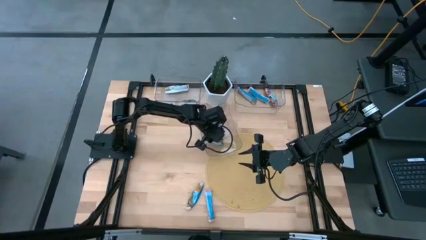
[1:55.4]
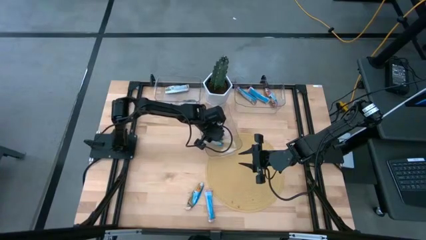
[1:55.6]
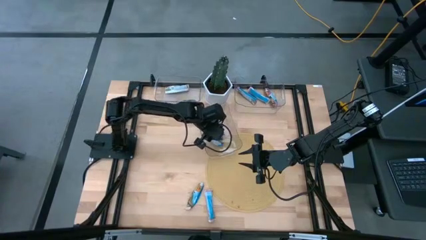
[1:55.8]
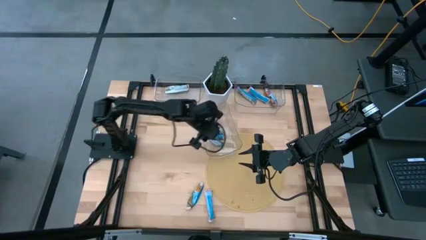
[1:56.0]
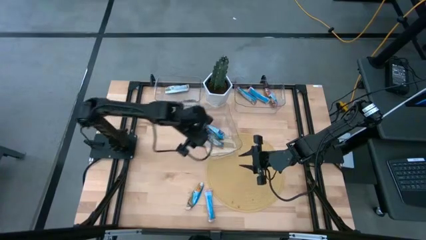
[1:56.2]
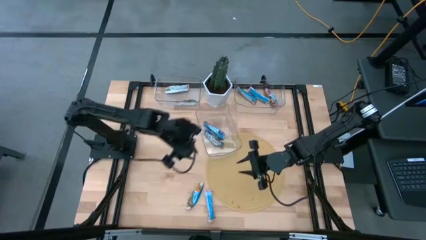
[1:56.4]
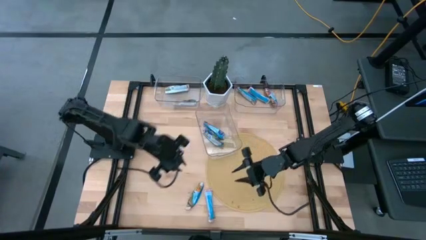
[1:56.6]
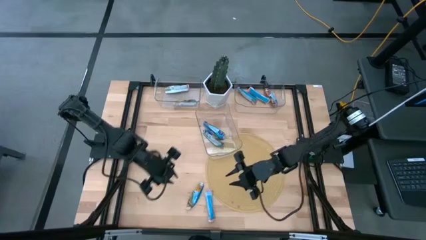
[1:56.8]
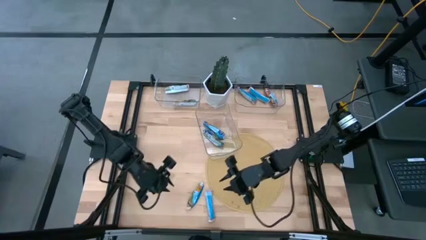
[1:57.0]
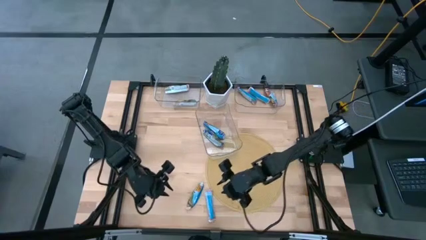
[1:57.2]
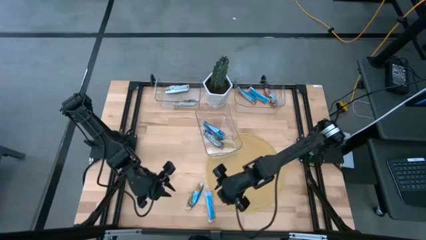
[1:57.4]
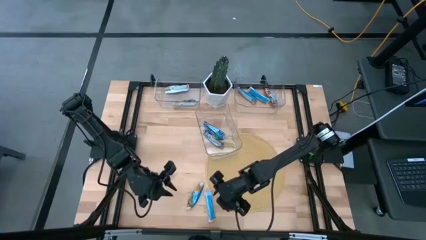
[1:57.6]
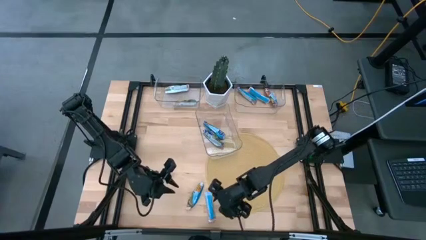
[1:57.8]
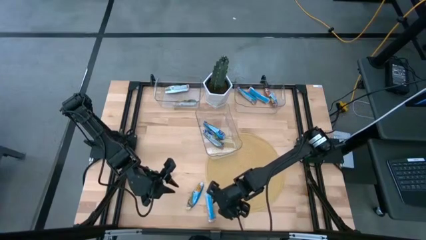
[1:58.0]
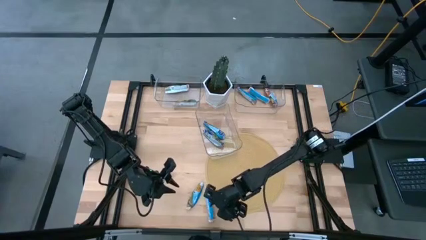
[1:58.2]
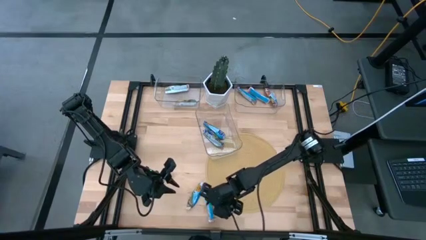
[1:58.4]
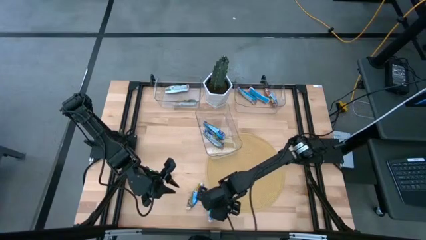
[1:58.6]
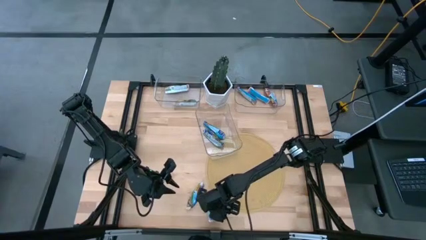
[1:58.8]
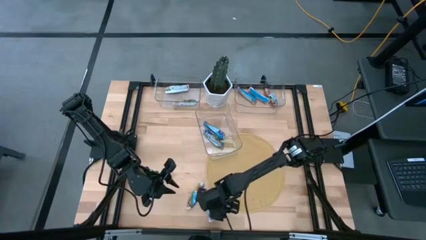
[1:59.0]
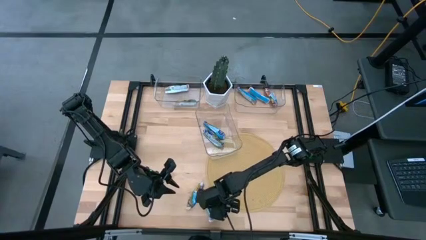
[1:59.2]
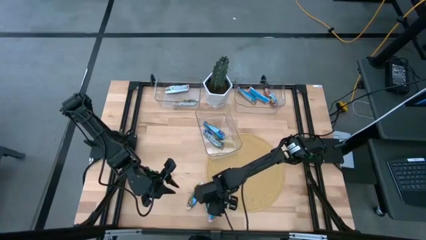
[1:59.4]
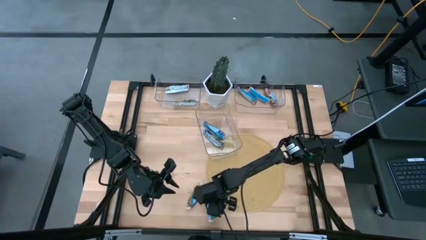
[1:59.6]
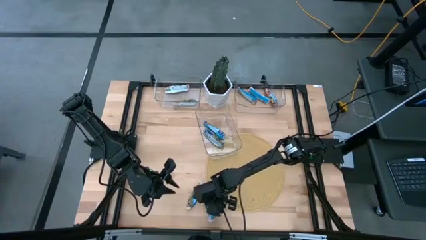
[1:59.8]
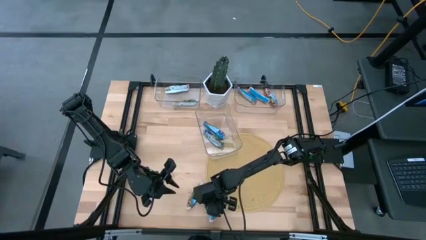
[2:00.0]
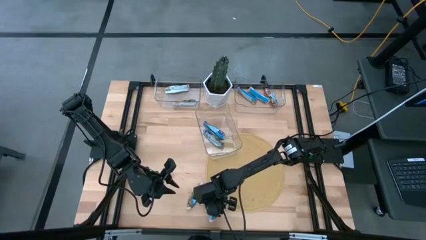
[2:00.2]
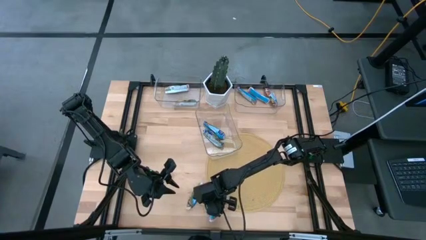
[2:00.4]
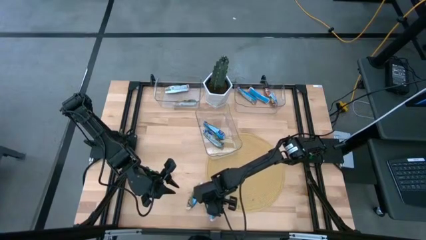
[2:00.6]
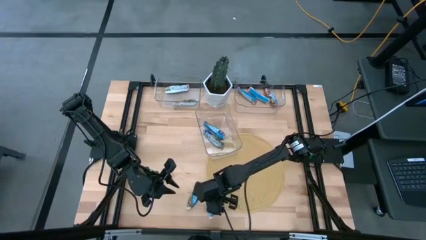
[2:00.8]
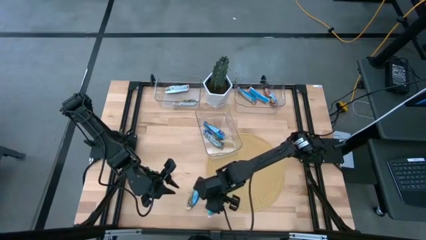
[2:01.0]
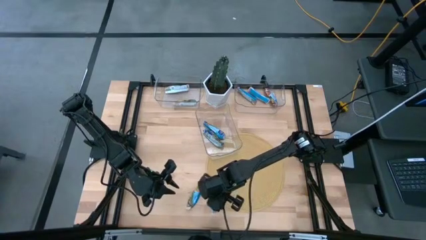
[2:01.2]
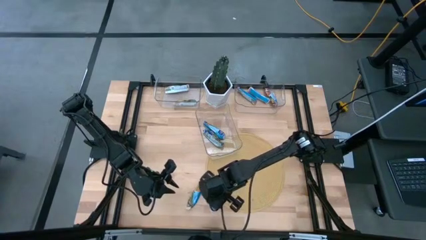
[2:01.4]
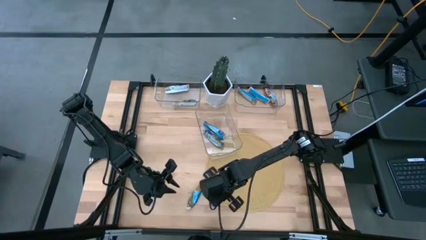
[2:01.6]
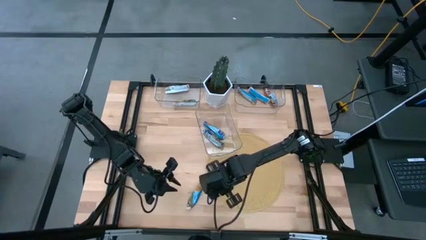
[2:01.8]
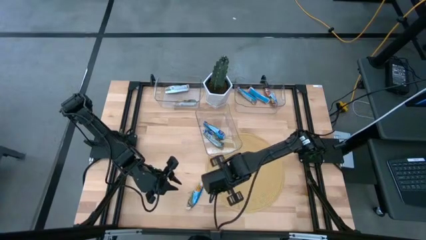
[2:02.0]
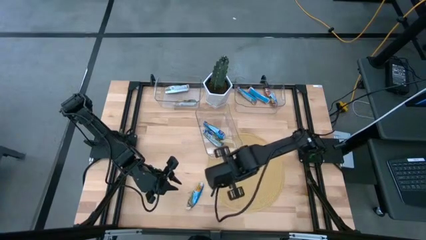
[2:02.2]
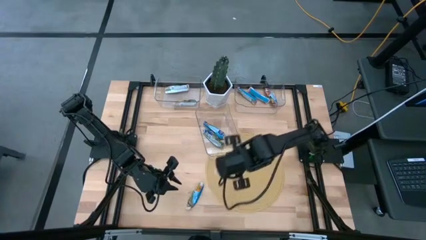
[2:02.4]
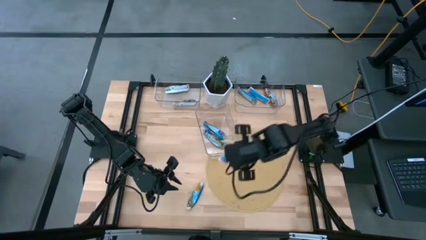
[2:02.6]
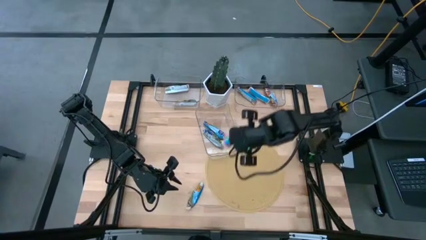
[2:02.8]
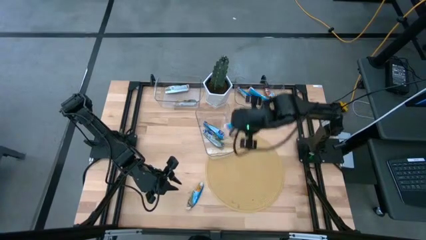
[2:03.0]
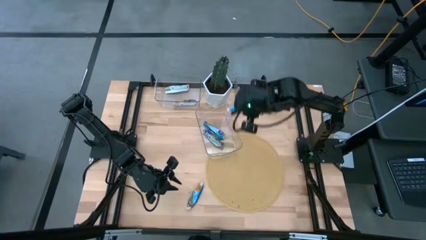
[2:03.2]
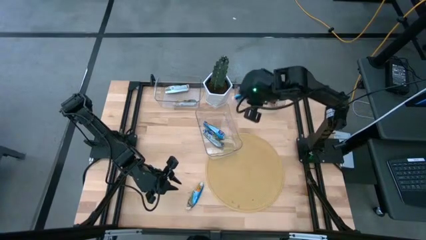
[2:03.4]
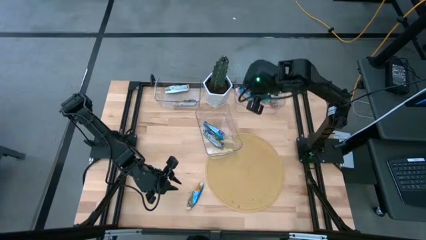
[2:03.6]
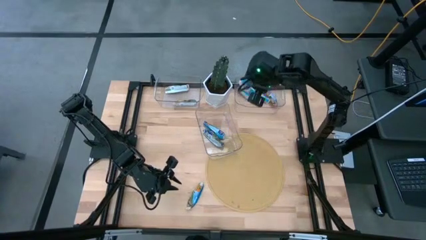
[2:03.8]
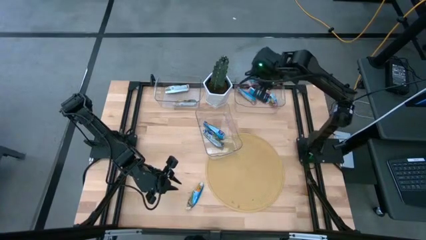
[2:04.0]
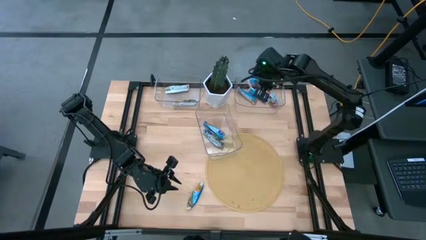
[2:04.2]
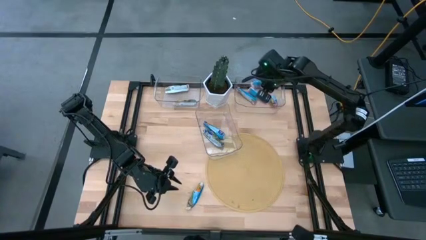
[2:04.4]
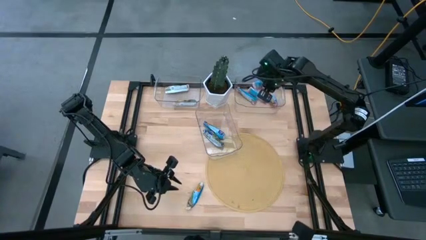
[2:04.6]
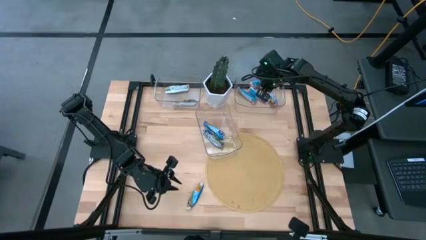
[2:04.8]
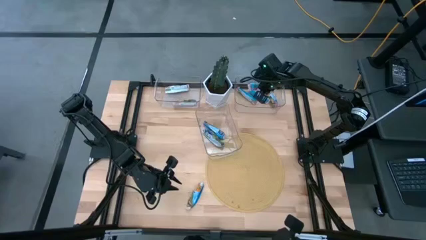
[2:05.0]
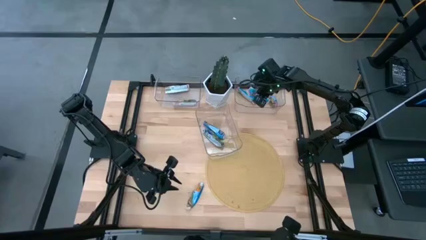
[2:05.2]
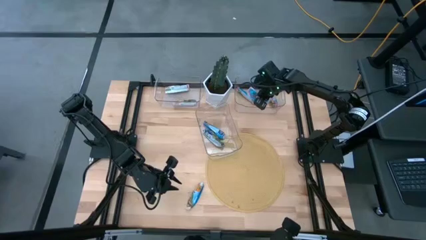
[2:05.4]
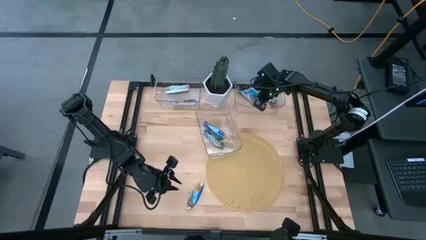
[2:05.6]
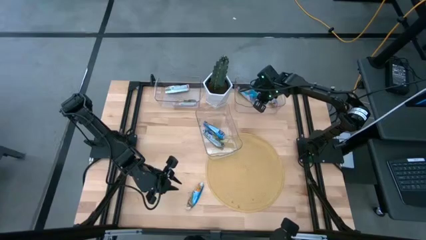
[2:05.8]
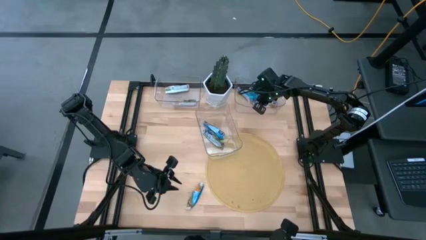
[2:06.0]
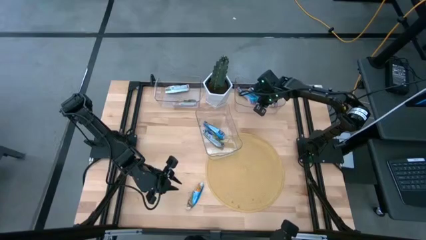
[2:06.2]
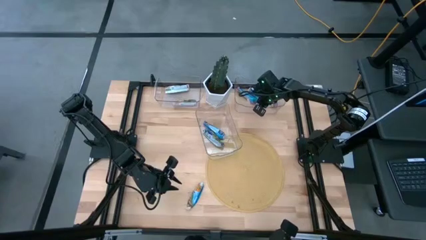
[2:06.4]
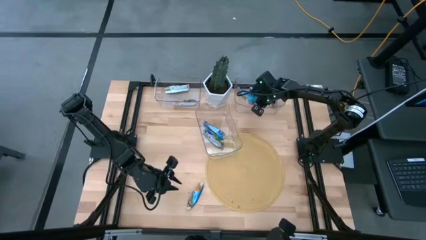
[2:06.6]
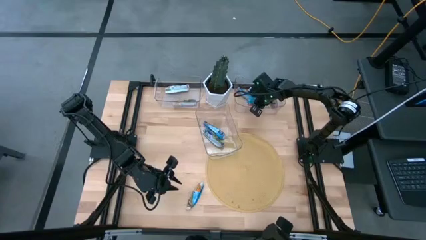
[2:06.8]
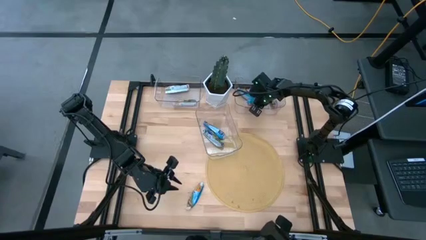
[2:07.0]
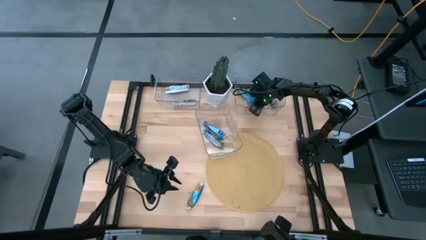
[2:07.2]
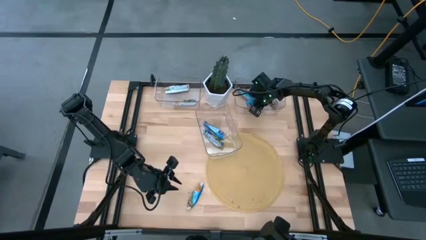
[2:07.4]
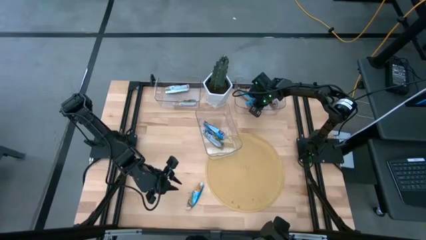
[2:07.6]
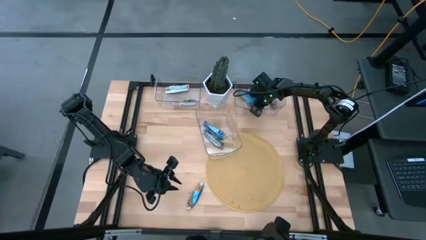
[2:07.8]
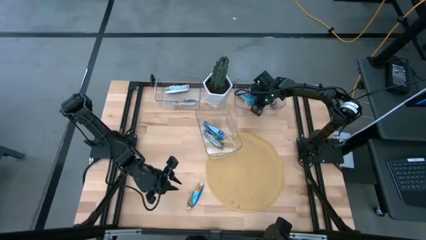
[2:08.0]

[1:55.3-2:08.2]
Task: Pick and place Granola Bars by type
Put the red green granola bar into the right transparent bin

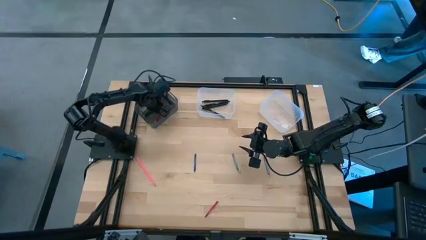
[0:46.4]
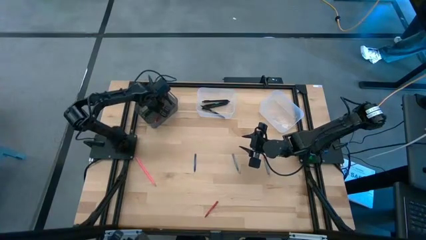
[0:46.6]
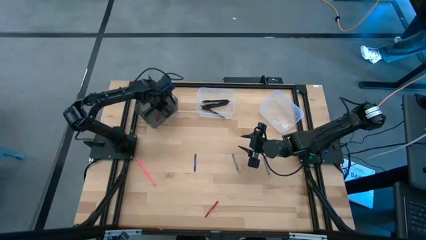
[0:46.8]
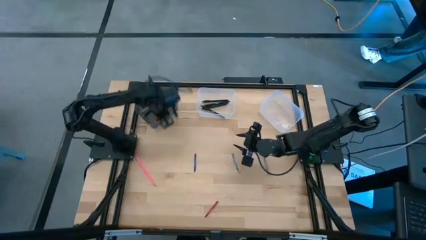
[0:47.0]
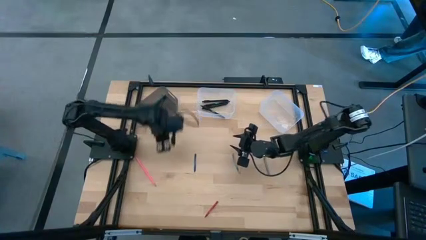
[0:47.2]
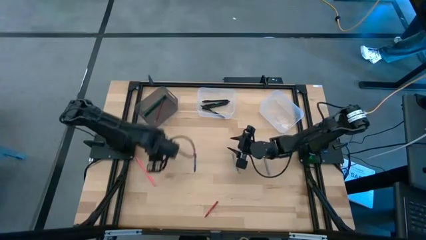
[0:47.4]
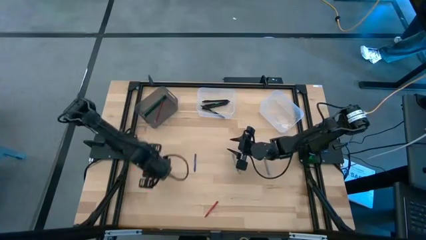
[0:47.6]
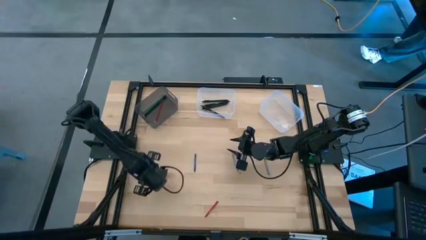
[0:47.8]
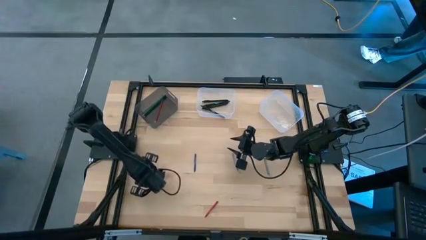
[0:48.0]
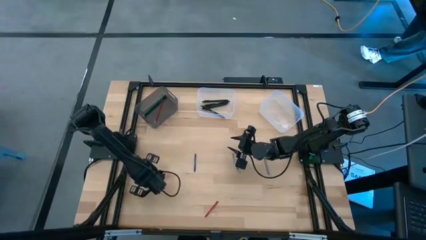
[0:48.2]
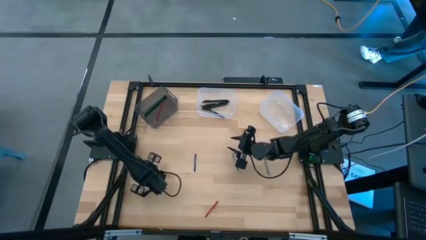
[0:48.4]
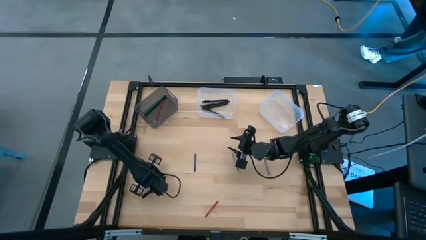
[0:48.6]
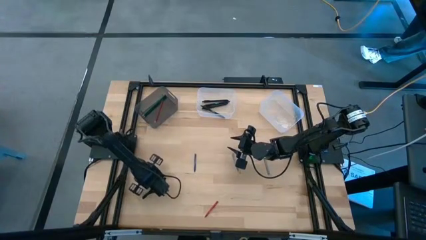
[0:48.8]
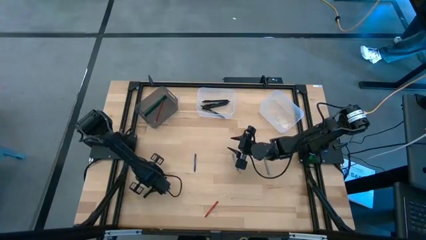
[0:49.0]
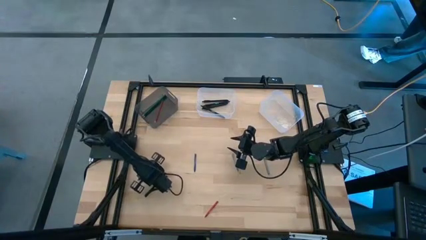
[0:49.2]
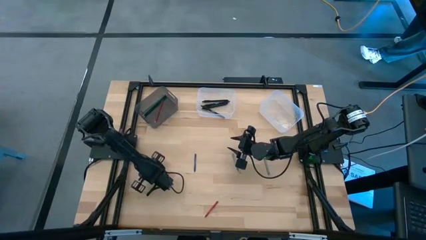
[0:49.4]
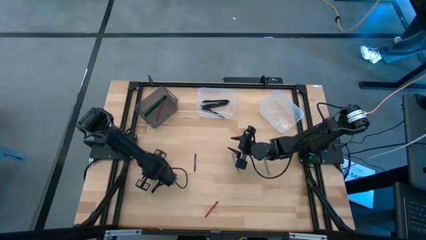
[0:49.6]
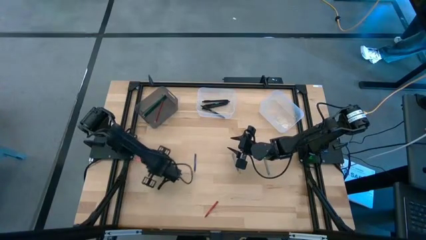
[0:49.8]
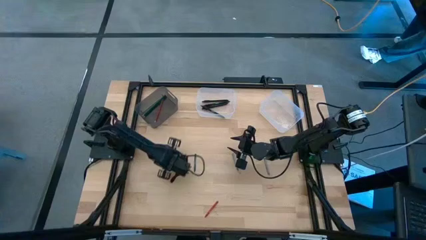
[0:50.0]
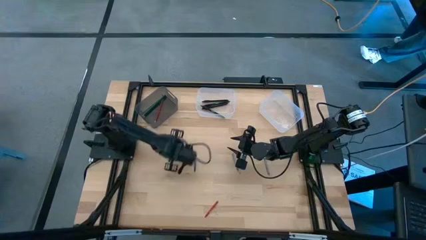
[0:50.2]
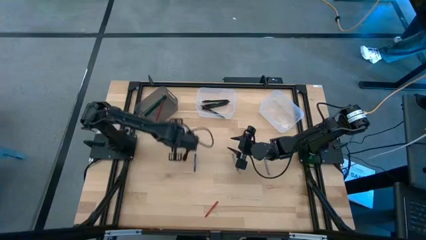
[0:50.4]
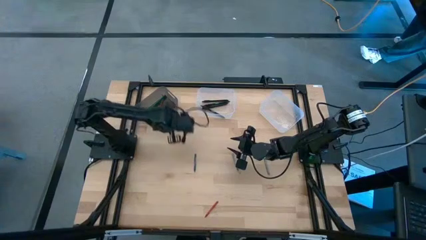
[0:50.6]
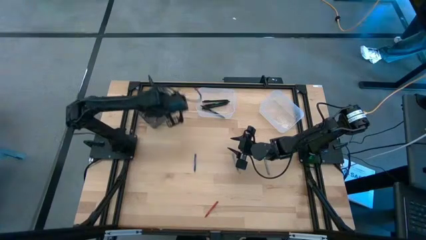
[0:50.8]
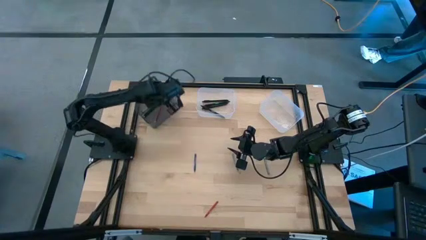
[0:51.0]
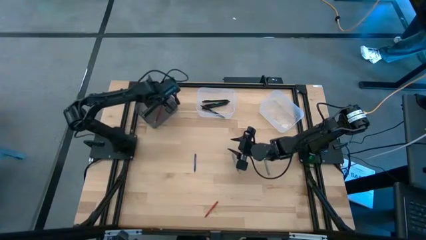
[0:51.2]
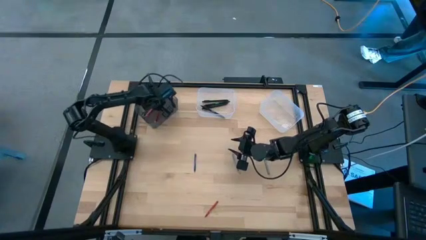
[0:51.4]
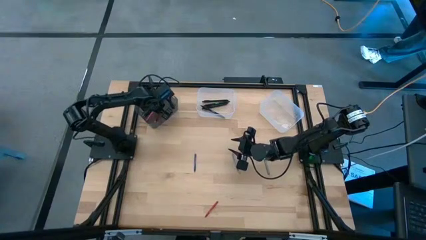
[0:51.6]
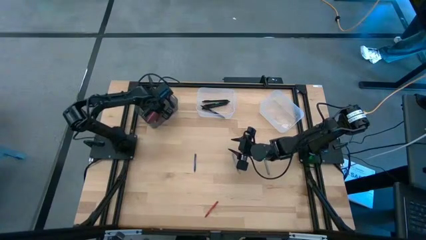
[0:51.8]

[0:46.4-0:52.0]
Task: Sort crayons/erasers/pens/pencils in bins
Put the pink pencil into the black bin
